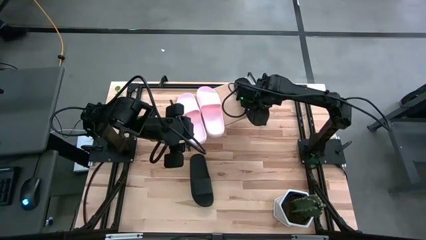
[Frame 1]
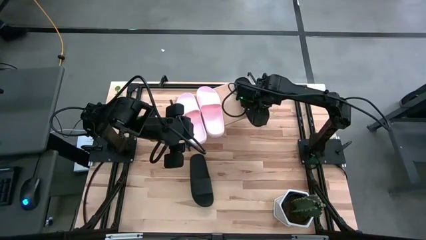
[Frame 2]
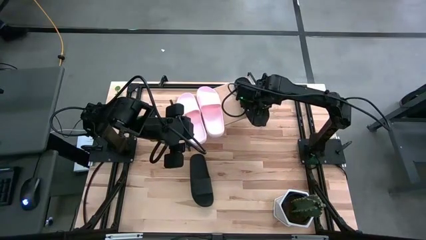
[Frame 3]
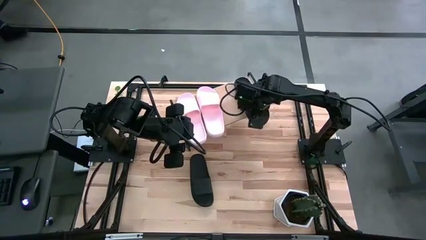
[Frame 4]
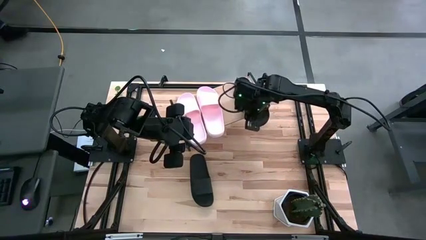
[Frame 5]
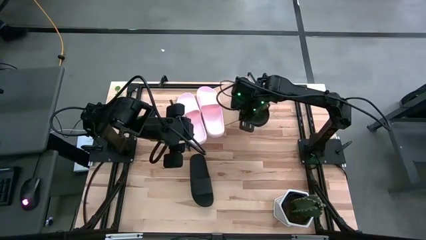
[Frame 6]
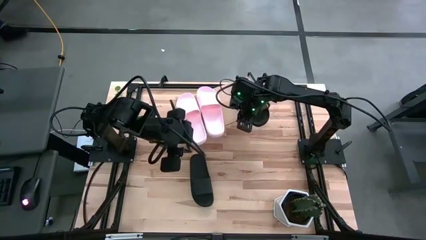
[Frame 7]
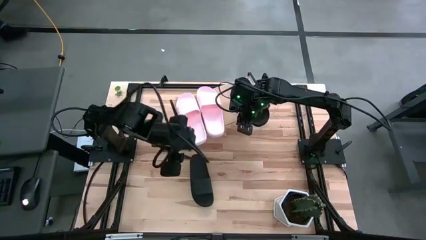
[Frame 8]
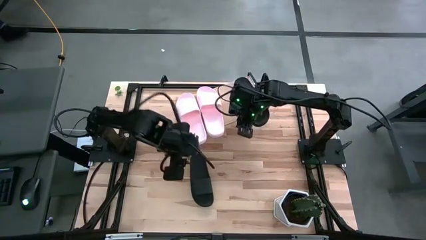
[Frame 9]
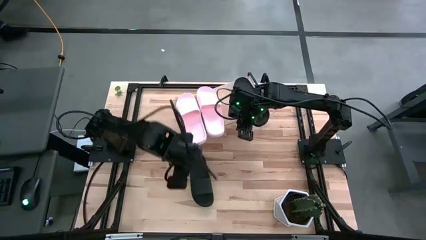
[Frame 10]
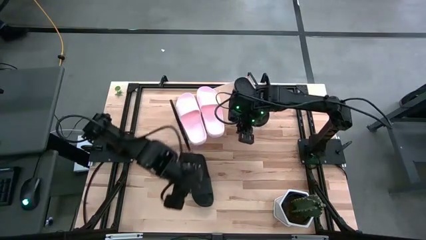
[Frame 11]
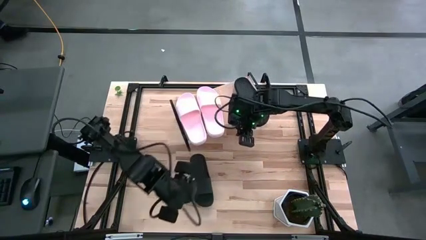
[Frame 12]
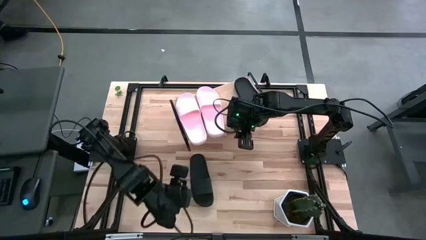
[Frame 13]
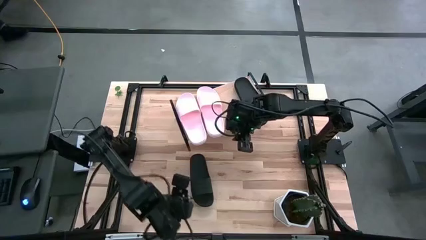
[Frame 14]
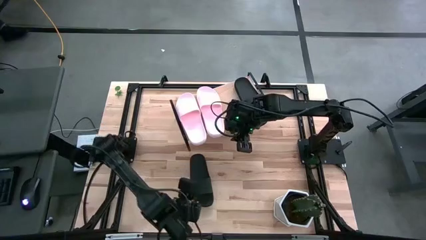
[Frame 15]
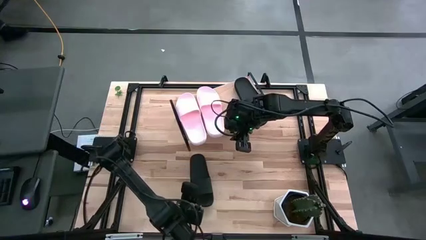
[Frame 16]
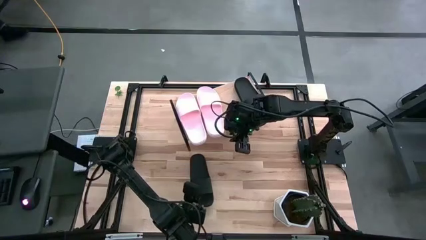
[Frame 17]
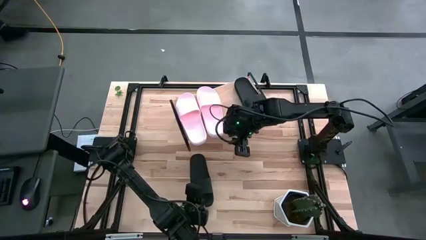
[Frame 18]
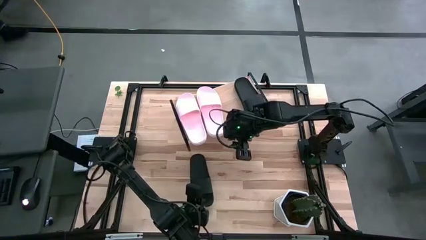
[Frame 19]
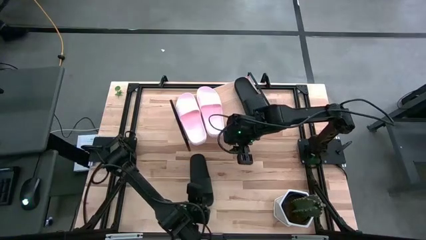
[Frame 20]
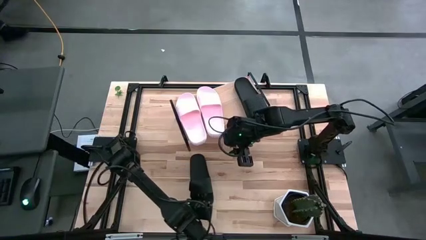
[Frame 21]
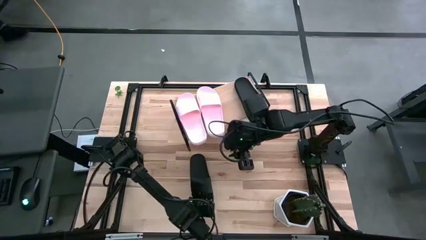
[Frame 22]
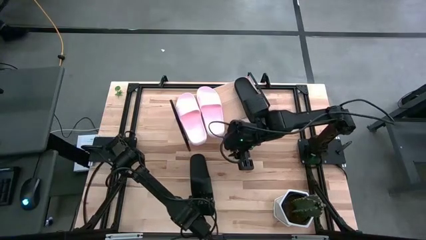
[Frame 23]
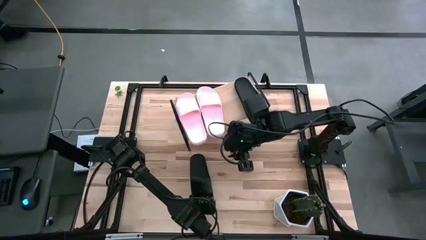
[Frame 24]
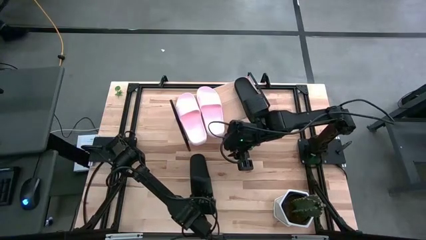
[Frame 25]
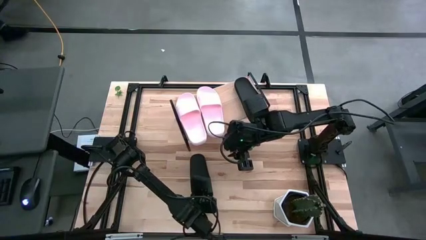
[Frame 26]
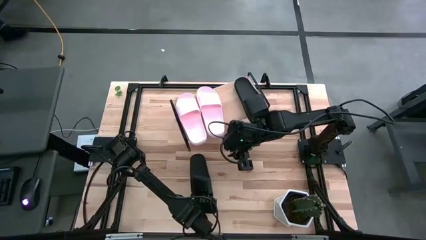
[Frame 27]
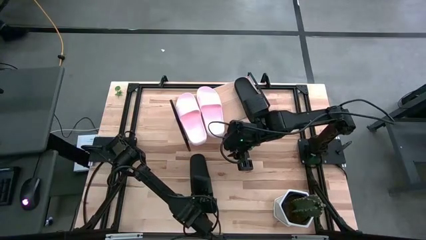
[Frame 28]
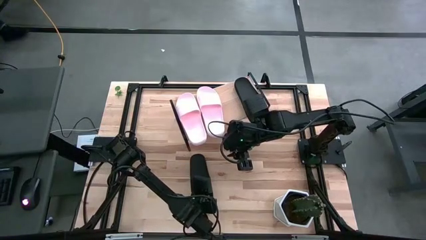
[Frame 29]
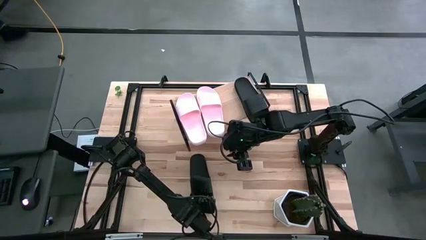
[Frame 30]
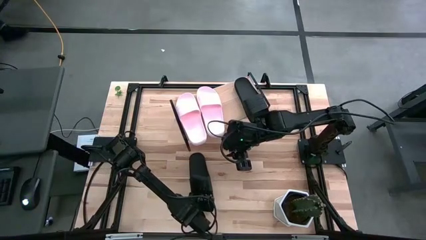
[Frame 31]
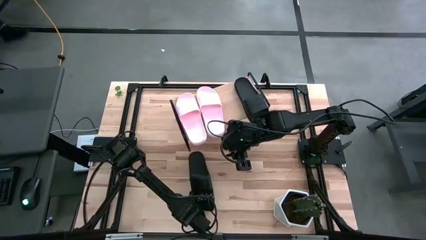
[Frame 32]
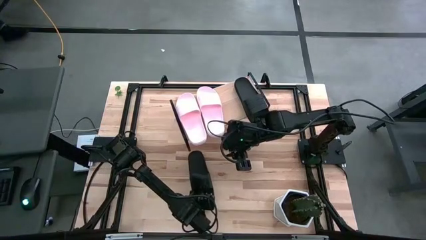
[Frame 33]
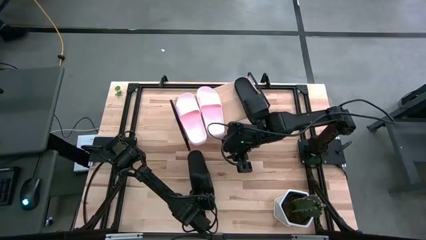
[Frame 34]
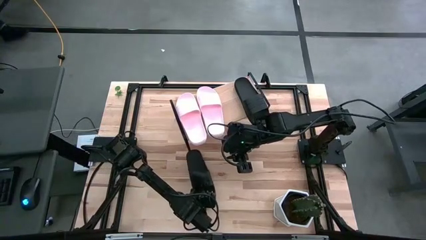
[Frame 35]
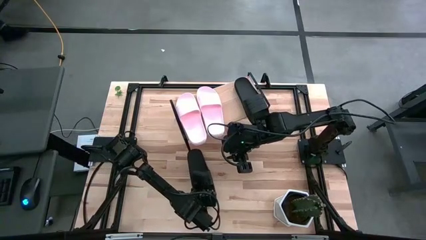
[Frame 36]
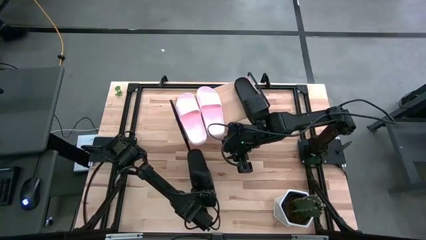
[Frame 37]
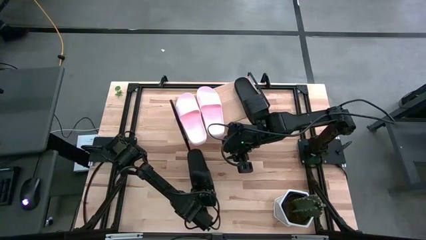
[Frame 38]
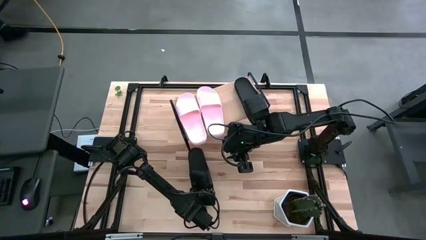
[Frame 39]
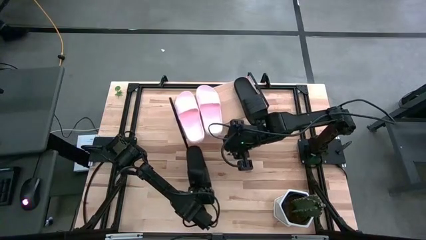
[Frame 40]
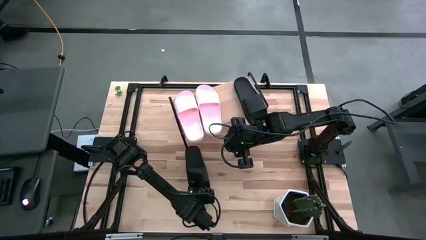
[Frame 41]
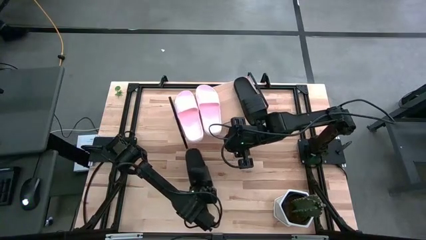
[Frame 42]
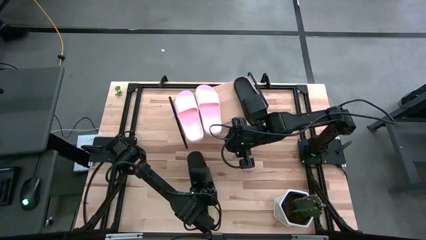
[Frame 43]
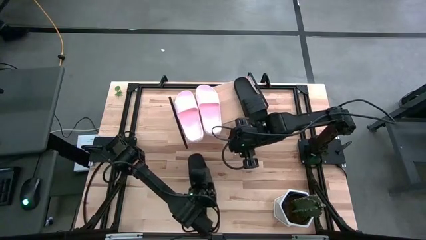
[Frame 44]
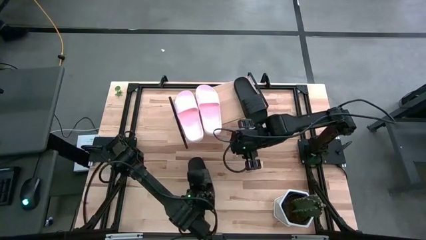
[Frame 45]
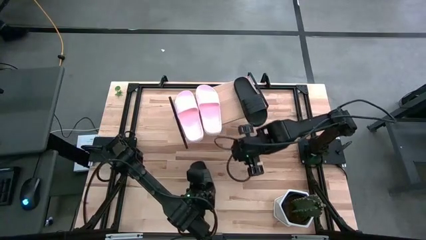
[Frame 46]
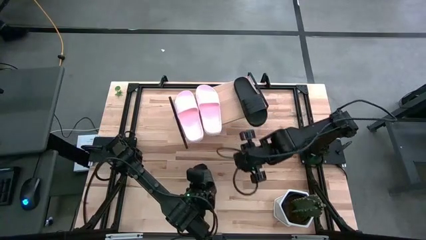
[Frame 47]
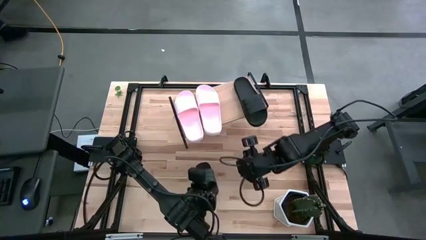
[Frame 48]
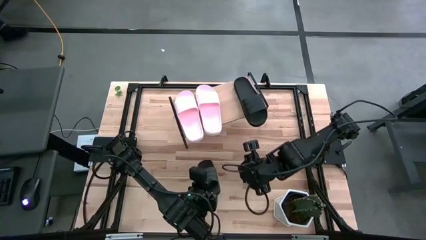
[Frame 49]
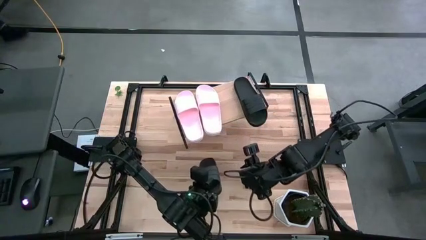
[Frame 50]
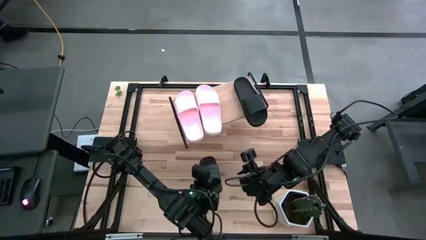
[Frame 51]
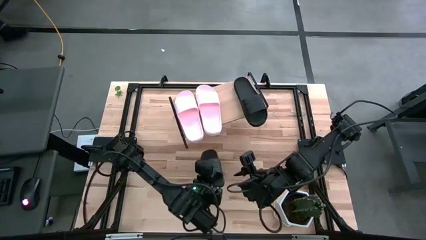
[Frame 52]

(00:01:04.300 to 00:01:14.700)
Task: Pick and place slides into the shelf
Put the black slide on the shelf

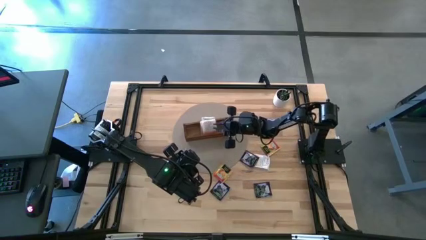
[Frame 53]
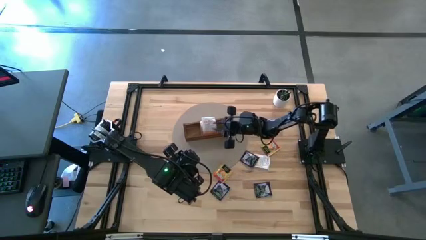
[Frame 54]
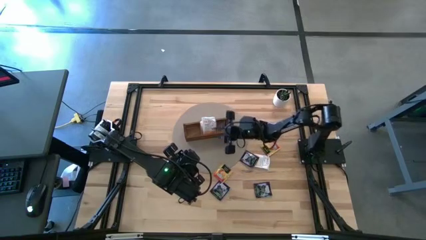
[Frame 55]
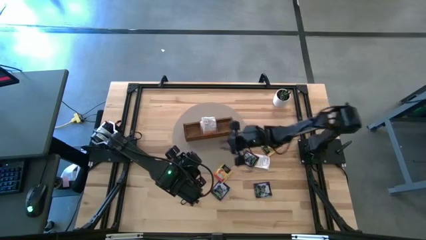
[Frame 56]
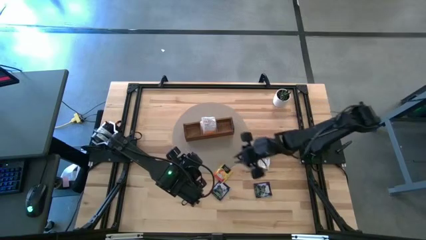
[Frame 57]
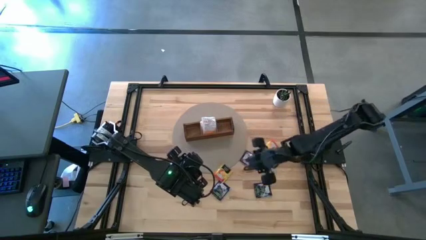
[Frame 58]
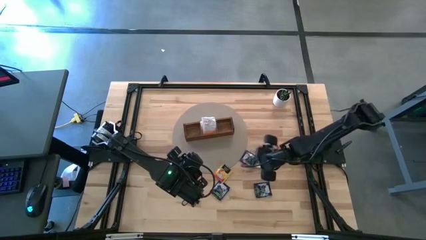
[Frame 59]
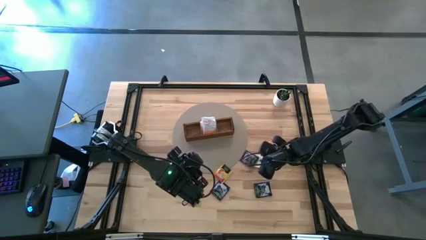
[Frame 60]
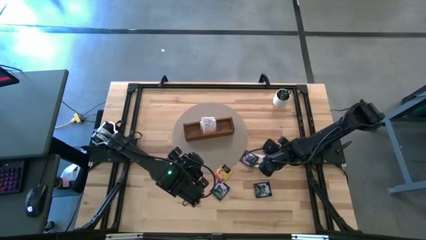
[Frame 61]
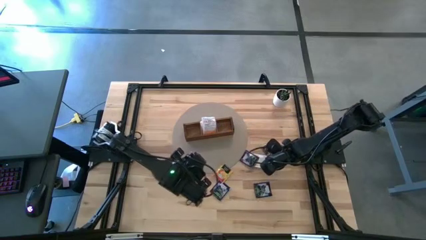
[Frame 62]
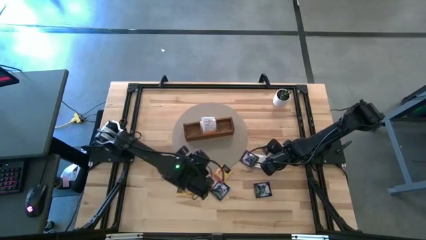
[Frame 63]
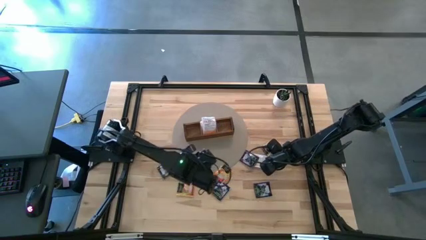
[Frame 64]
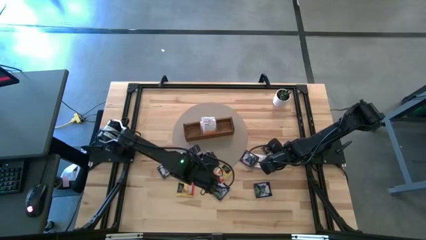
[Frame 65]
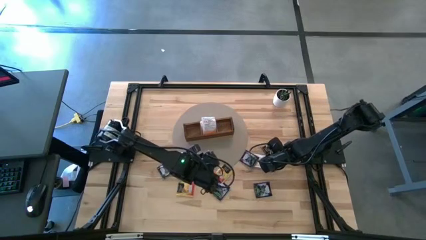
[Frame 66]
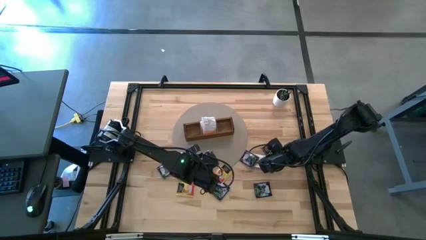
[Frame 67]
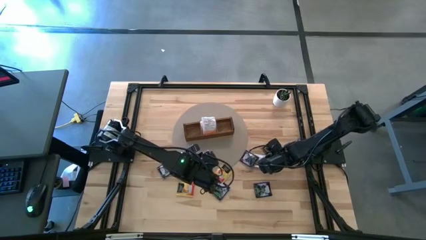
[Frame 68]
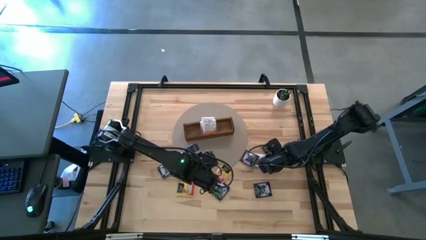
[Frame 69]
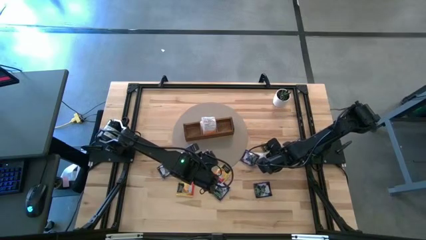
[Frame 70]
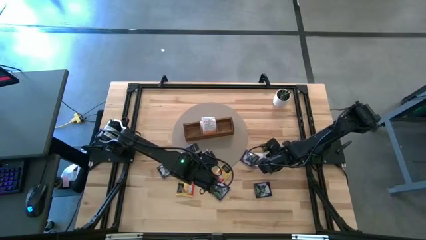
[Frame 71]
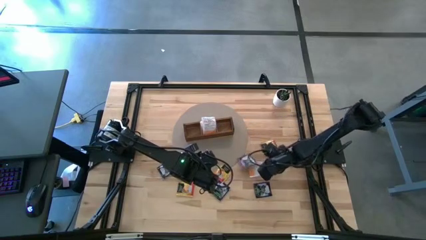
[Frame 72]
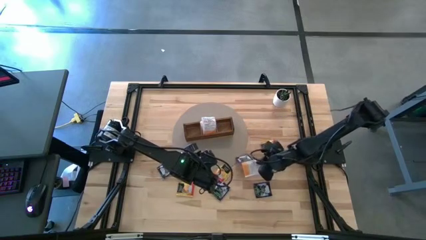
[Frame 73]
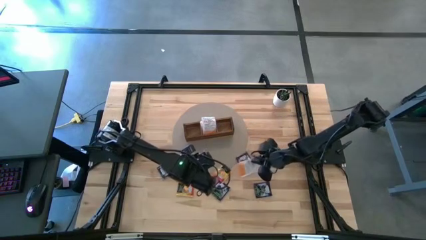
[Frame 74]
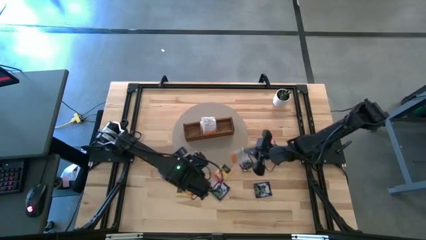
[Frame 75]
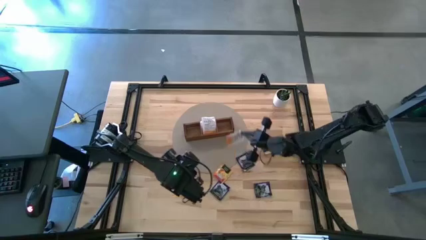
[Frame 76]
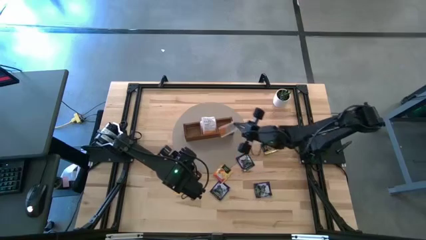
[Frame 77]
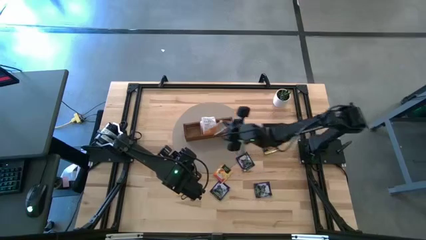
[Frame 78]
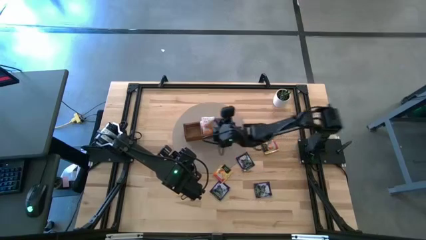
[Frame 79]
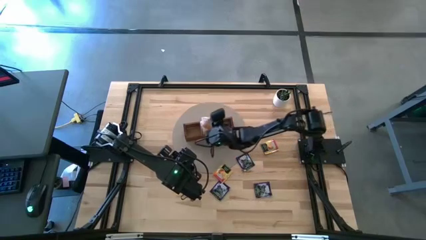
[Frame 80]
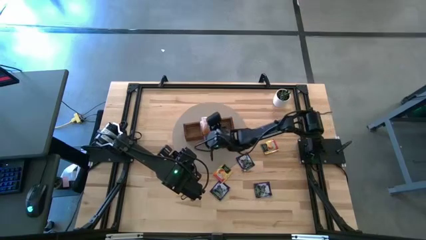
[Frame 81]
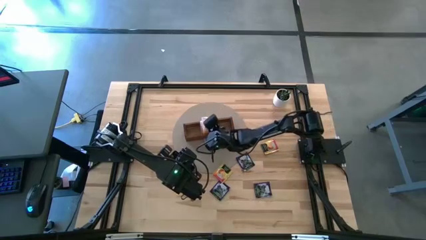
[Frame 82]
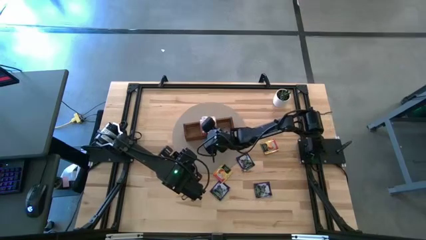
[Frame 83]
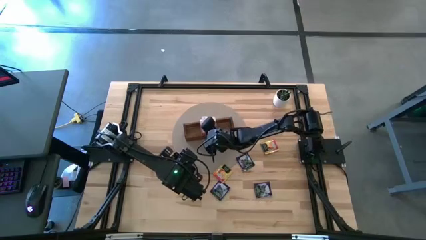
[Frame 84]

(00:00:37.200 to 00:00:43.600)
Task: Pick & Place Tea
Put the white tea bag into the middle section of the wooden organizer
